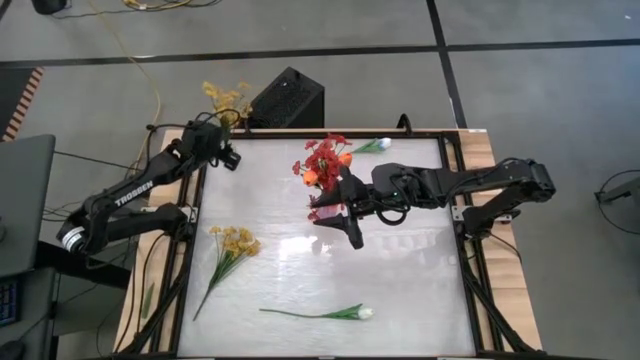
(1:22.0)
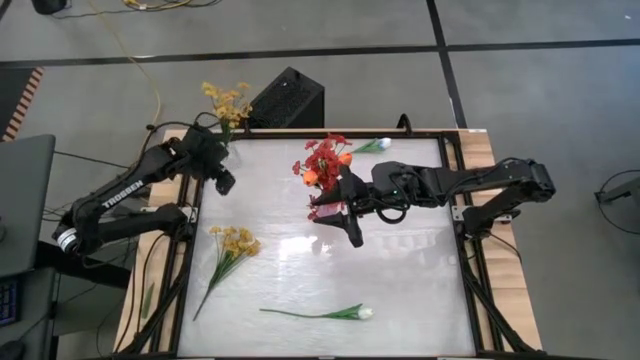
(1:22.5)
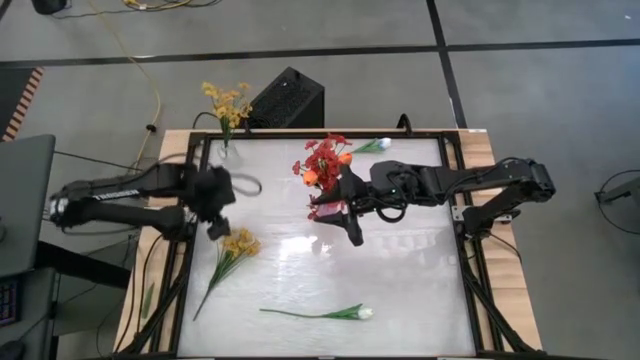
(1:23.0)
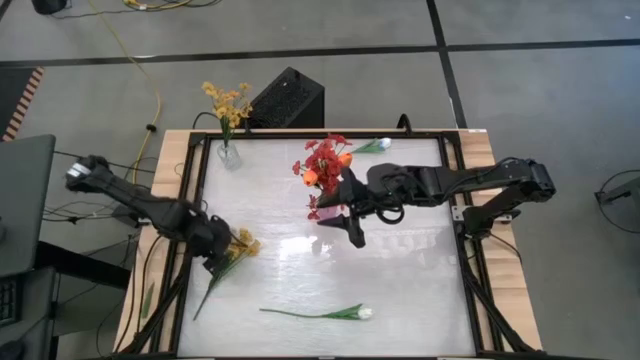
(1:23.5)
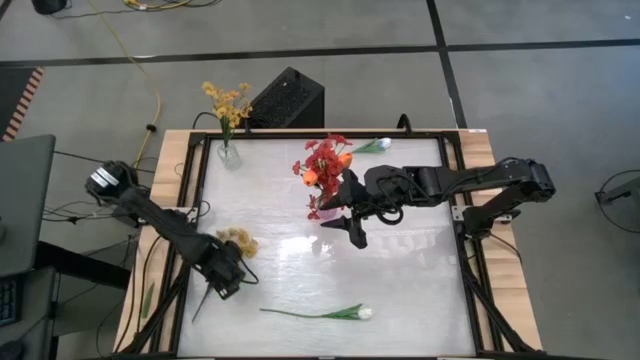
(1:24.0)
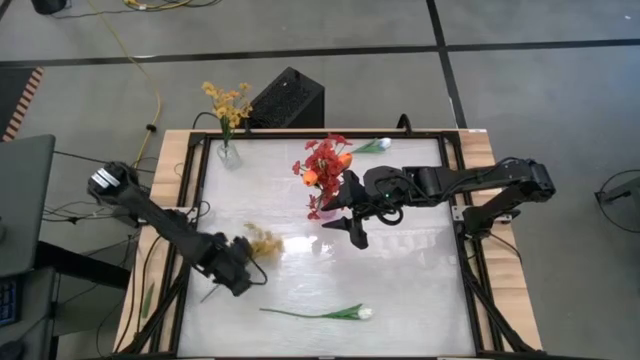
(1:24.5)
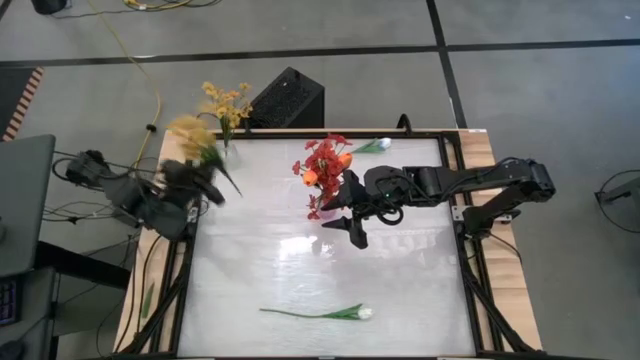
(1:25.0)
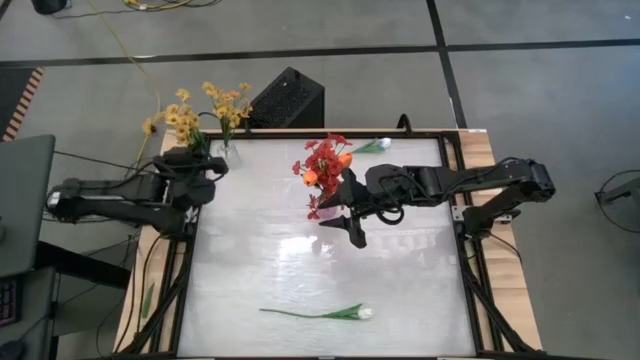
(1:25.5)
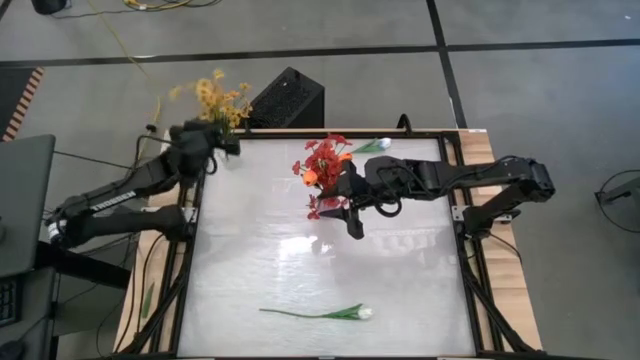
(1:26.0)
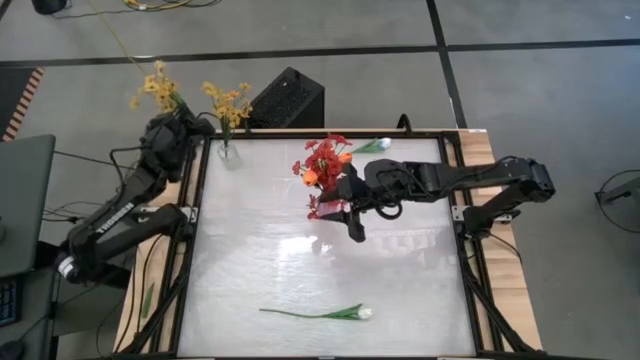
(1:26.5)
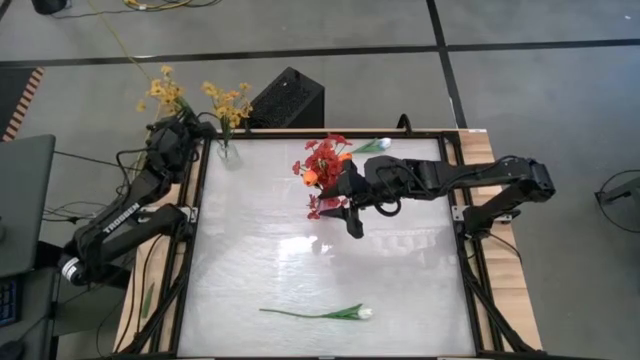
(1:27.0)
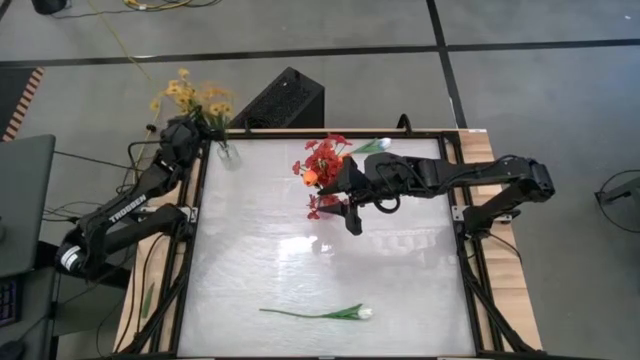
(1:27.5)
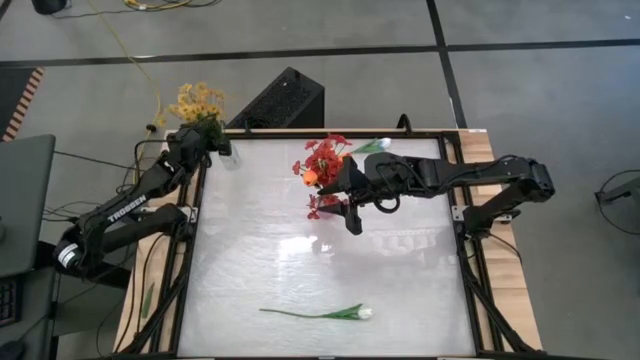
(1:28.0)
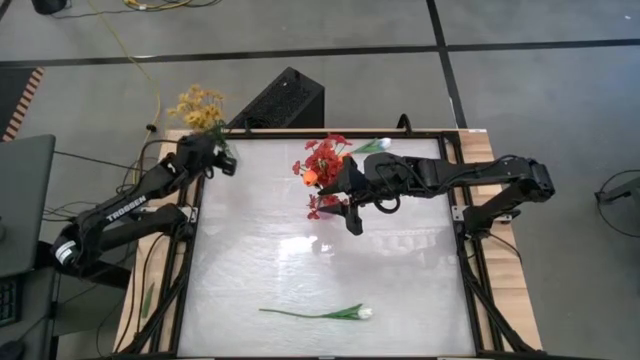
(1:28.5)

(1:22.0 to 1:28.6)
Task: Sort flowers into vase by color
Put the yellow flower into the transparent vase

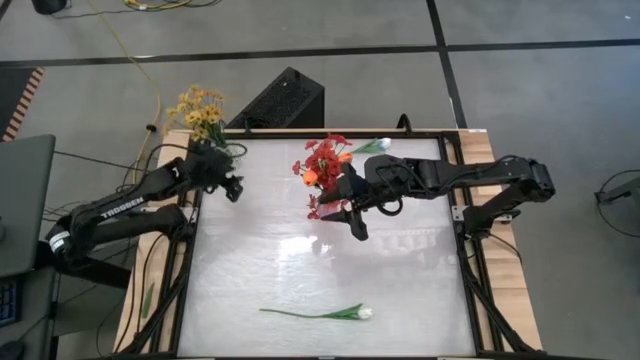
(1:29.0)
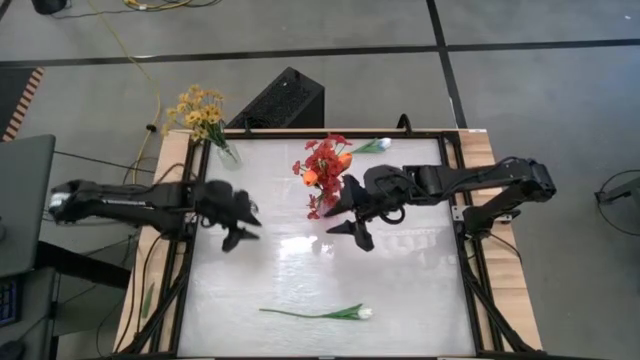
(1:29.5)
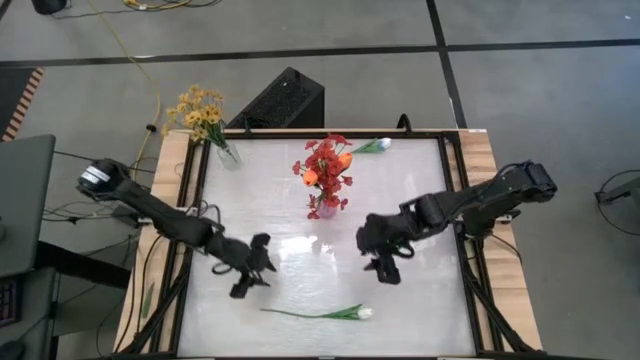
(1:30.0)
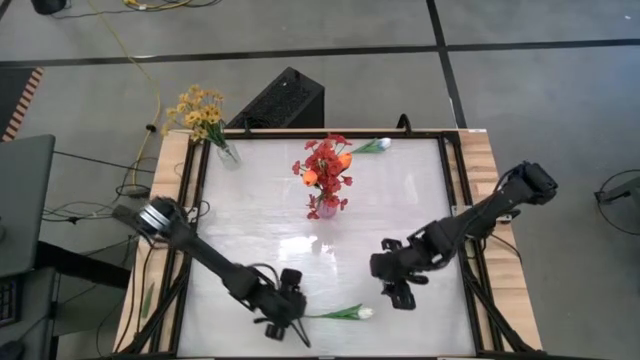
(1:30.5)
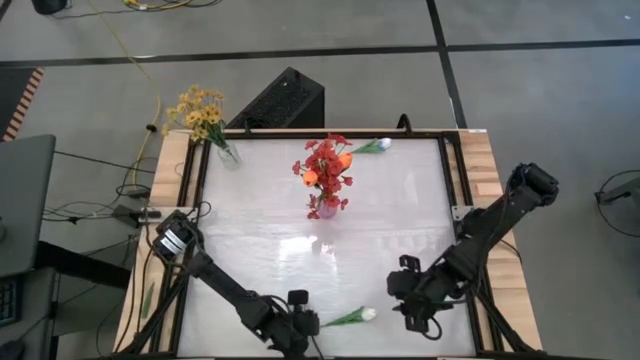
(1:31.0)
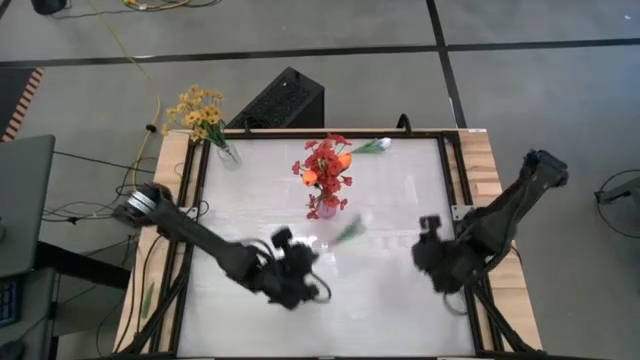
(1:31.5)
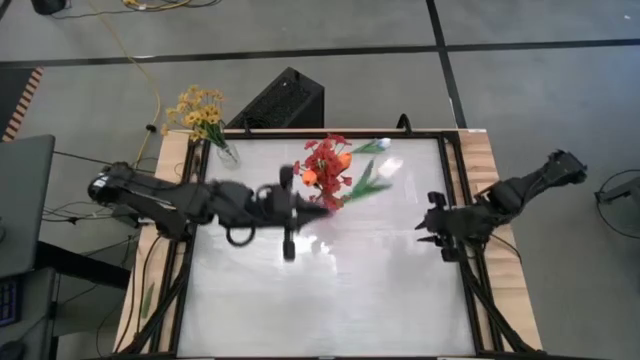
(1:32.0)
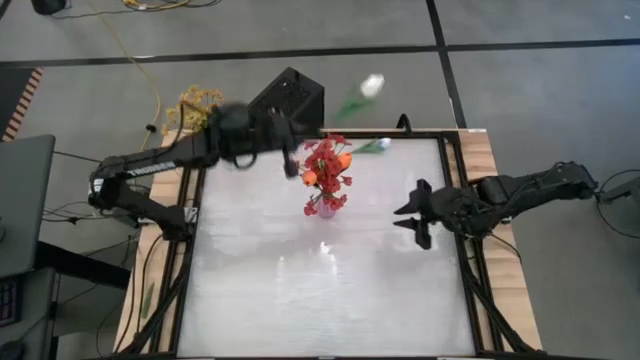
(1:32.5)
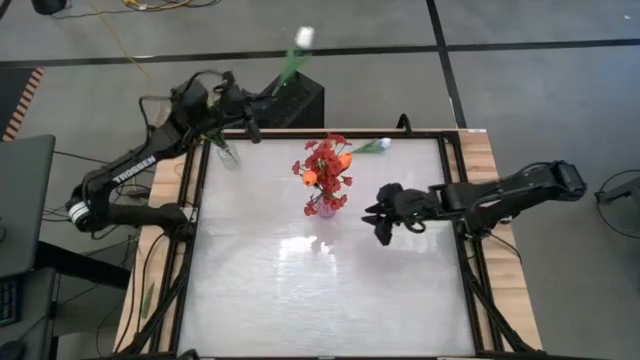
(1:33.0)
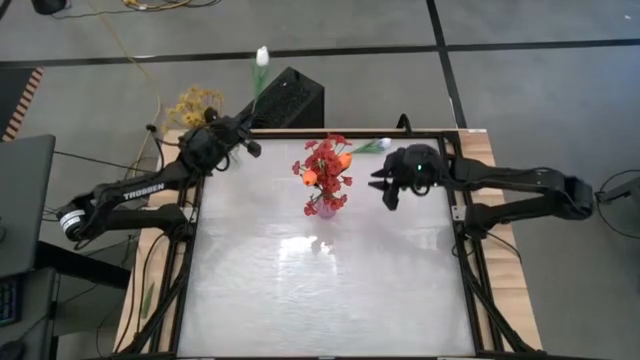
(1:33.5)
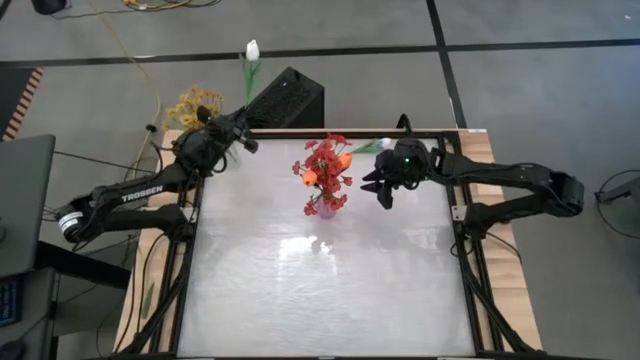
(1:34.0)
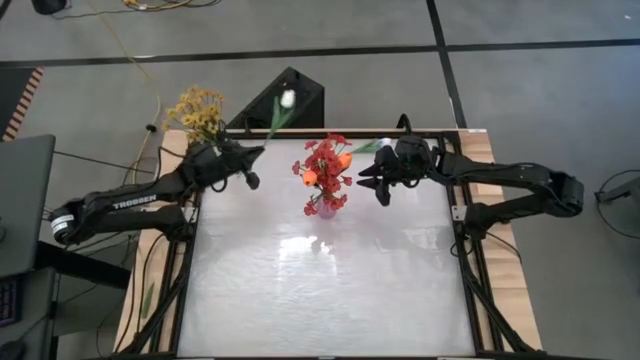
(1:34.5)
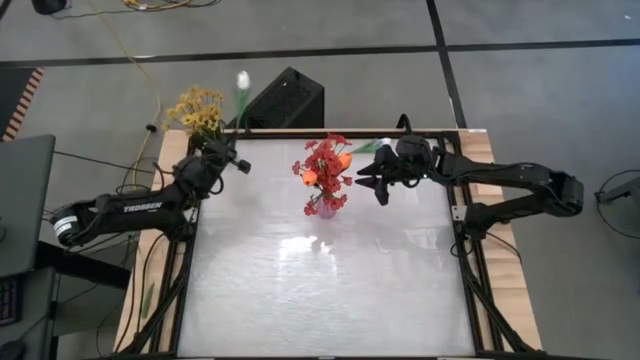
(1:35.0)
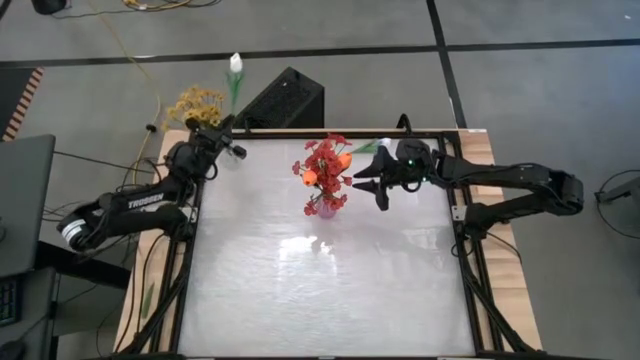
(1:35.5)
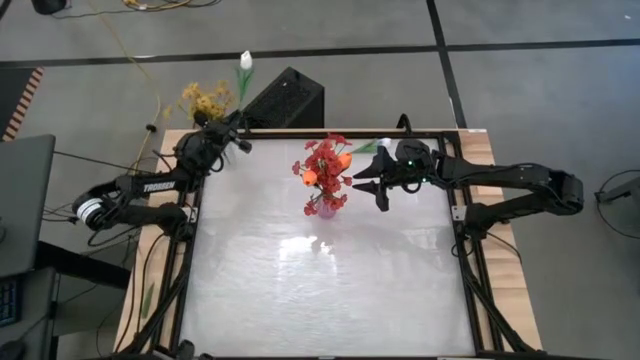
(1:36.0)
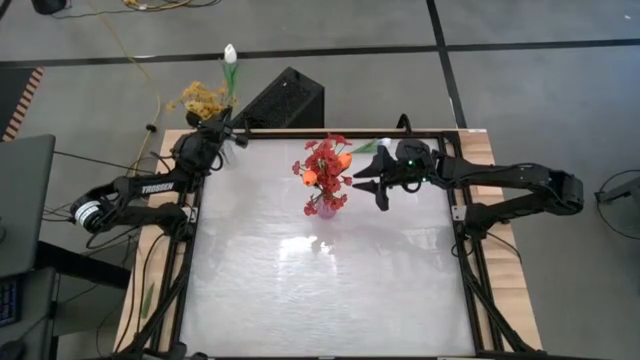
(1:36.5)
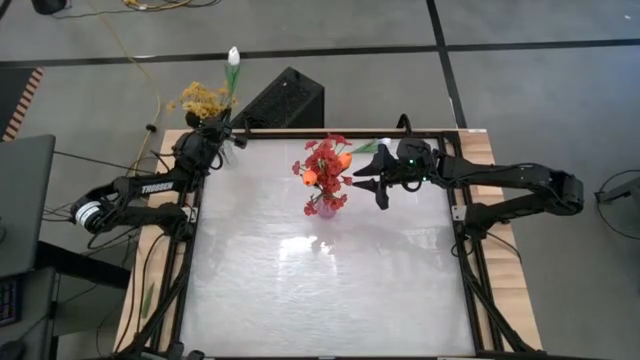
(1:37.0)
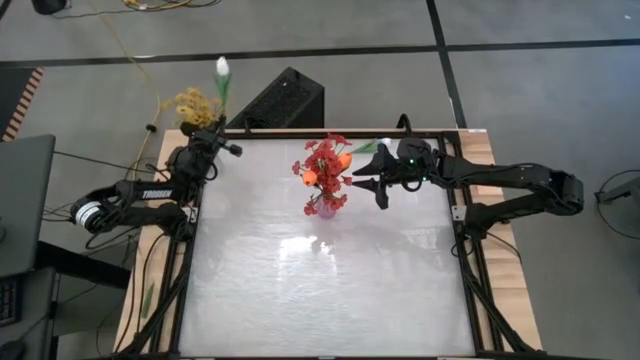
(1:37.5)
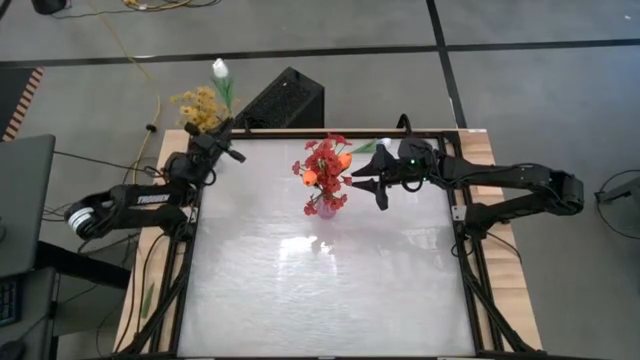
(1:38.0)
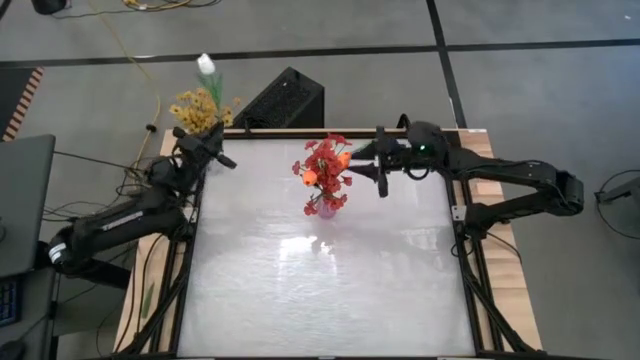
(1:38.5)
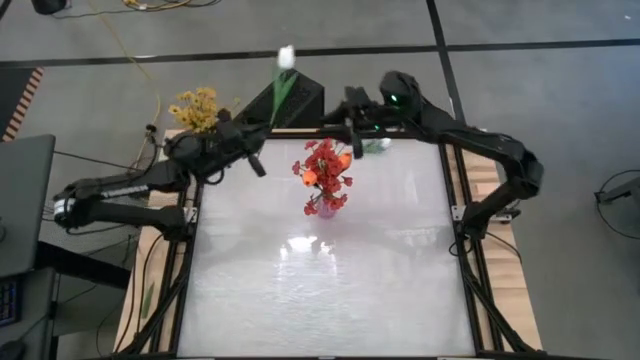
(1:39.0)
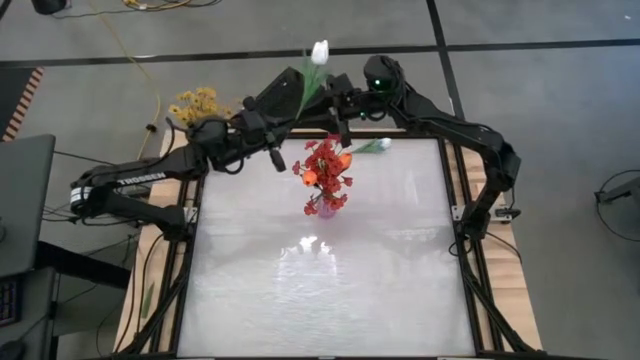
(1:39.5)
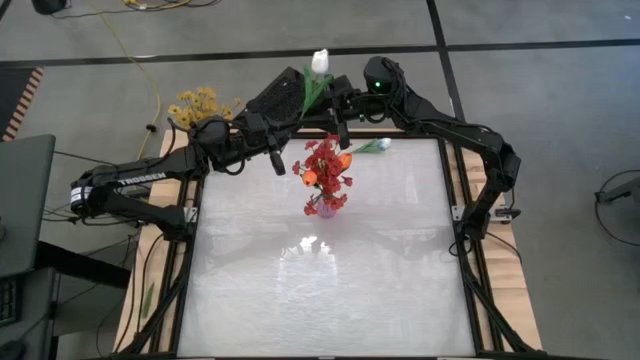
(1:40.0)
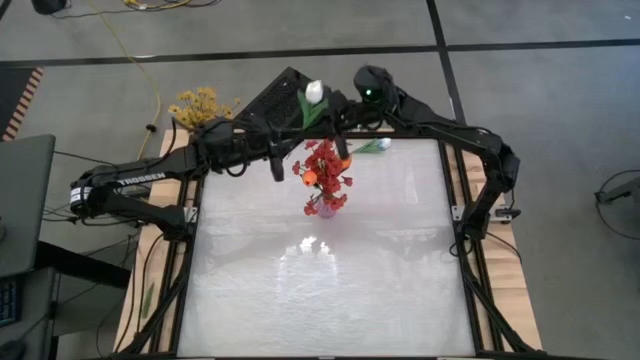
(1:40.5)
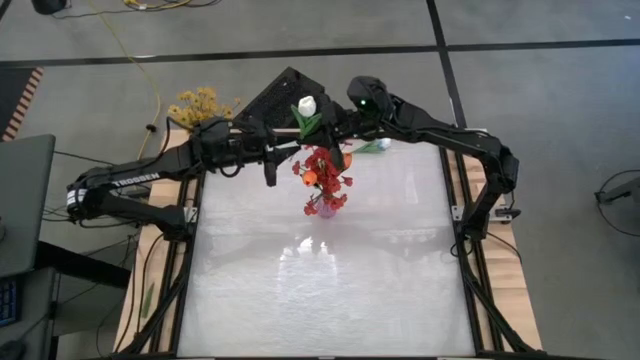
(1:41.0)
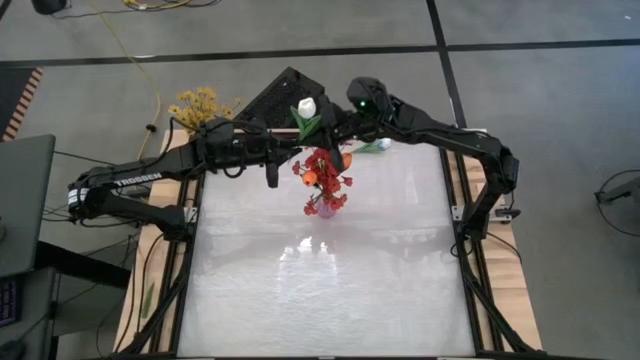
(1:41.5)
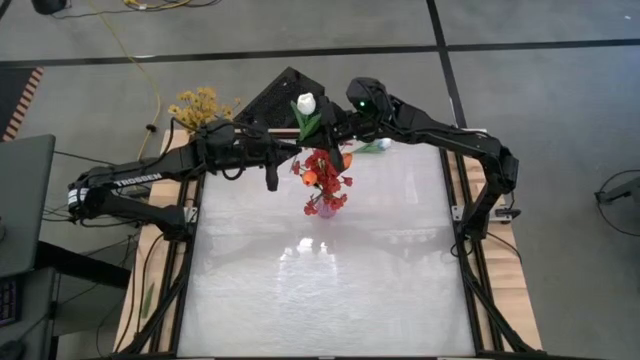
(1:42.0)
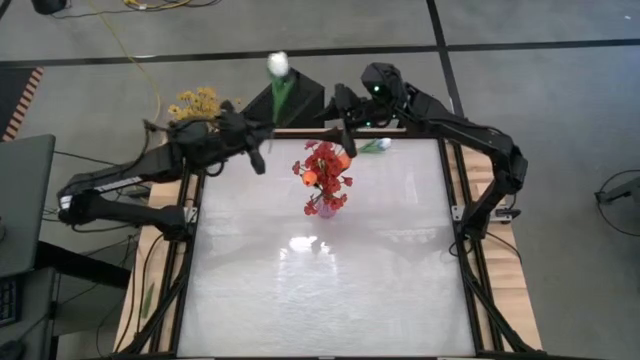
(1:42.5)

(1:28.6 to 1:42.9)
Put the bottom white tulip into the transparent vase

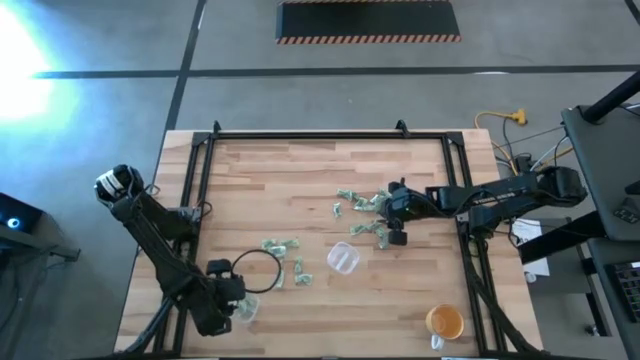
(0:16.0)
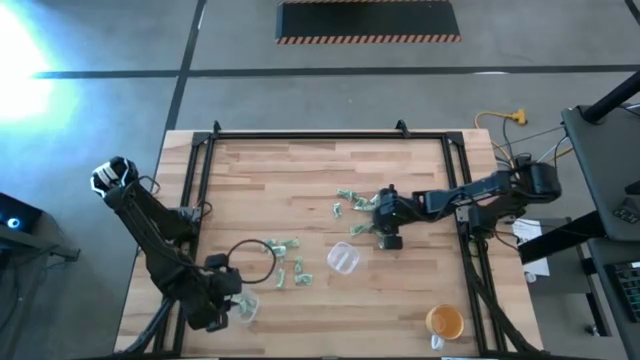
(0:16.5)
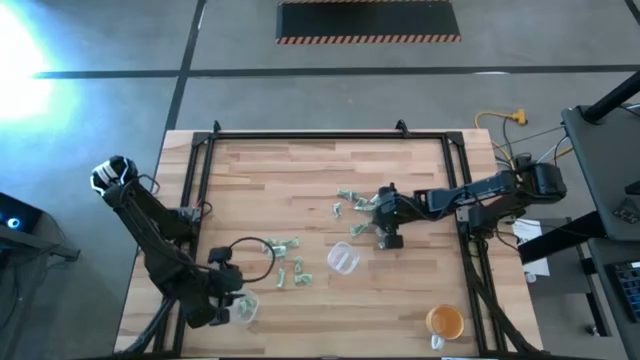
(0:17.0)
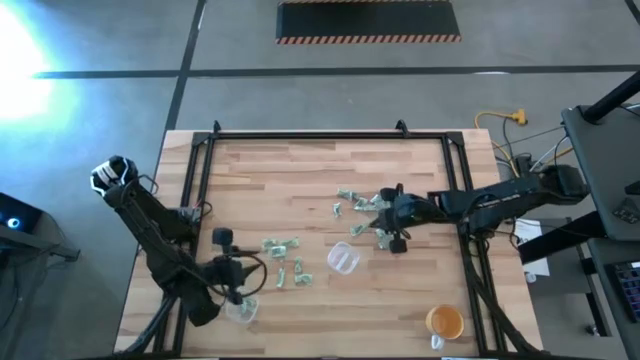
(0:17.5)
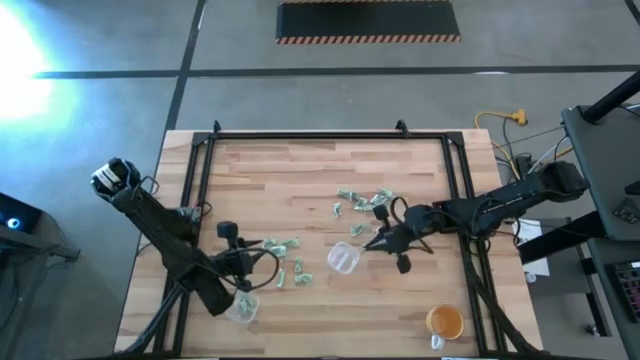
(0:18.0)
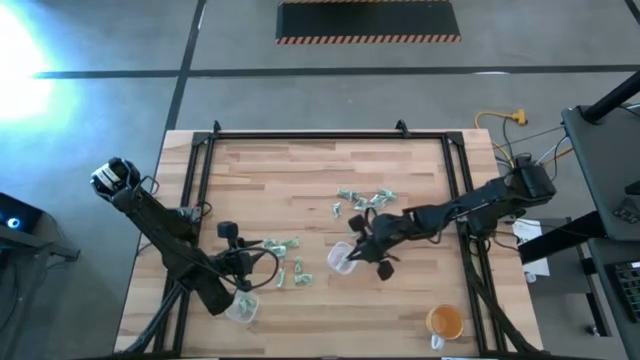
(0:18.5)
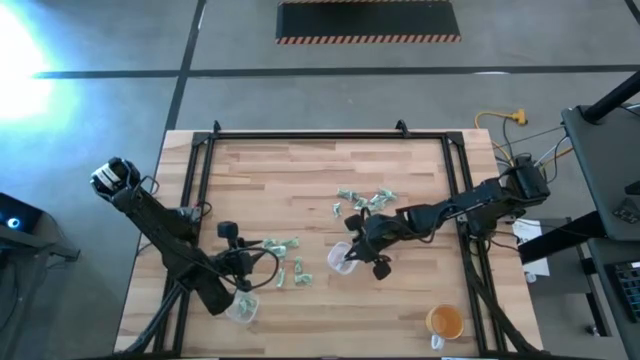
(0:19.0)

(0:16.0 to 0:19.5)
Task: Pick and place items into bin
Put the light green packet into the top transparent bin
